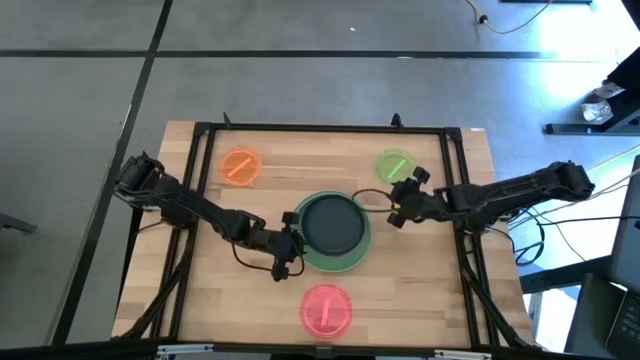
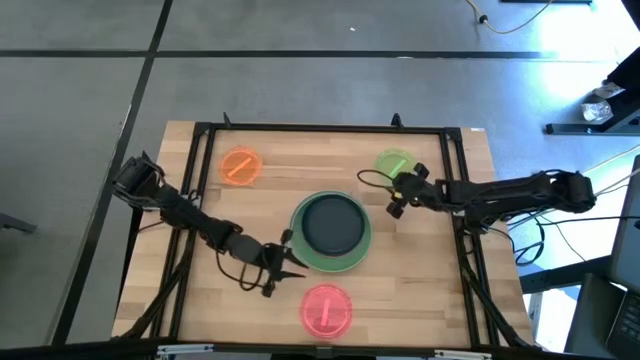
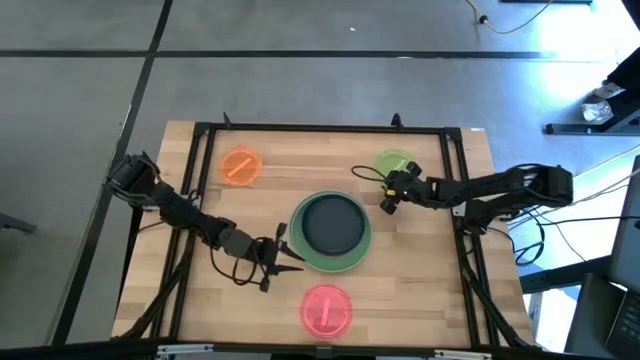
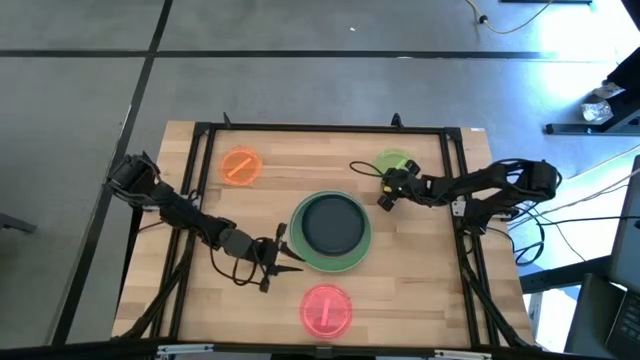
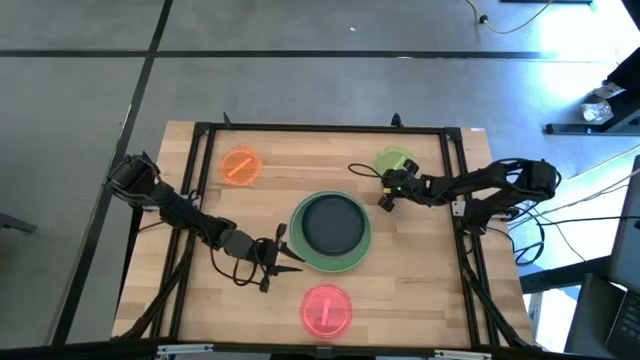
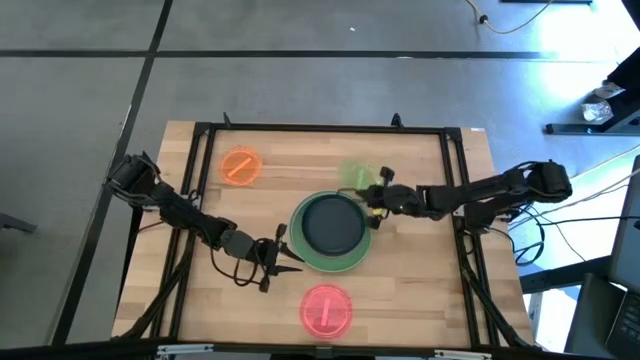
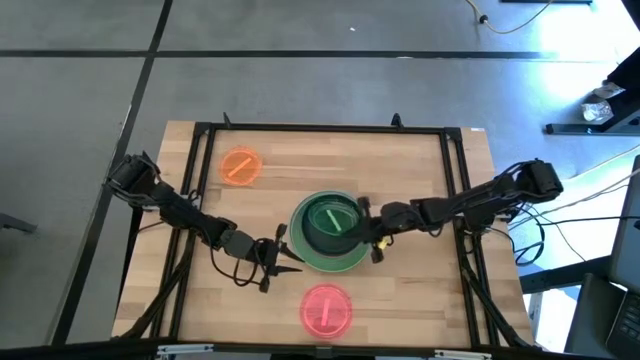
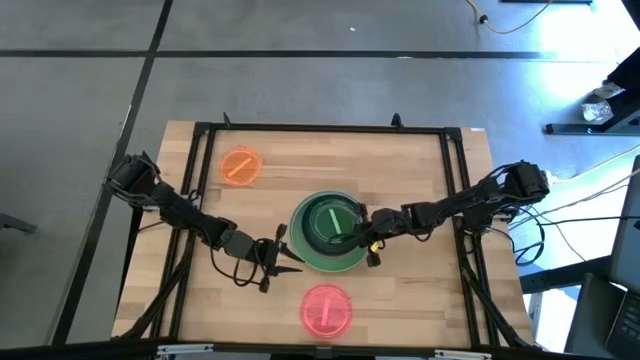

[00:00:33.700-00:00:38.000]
Task: Stack plastic plates
Stack the transparent green plate on top of the dark blue plate

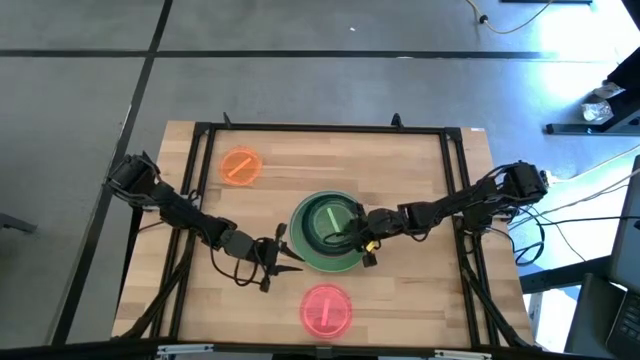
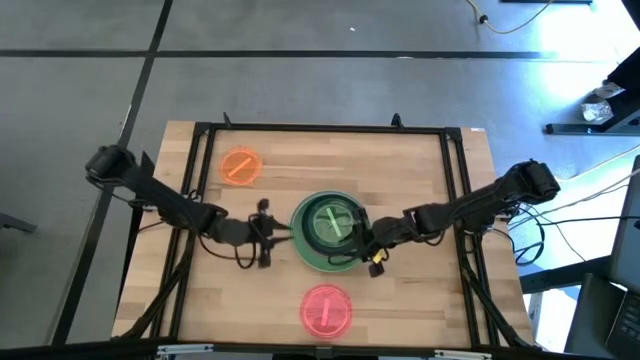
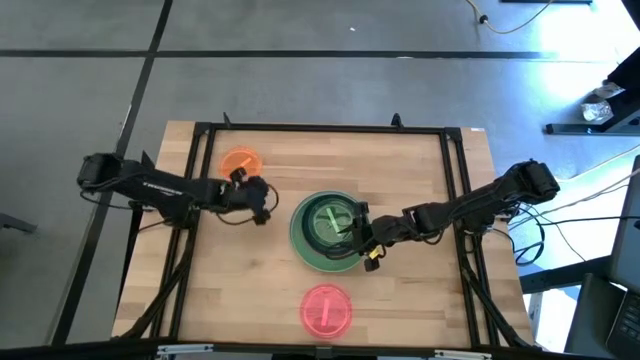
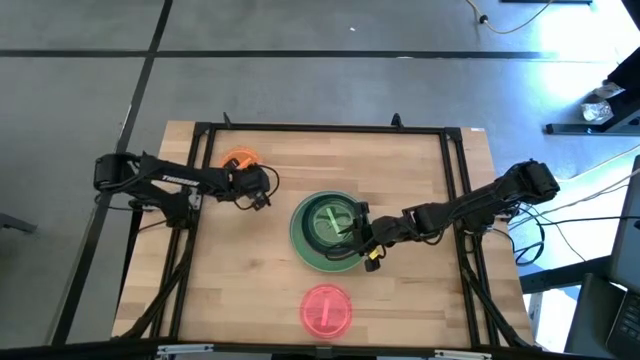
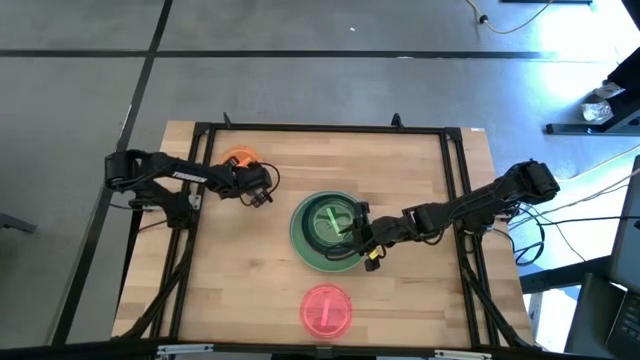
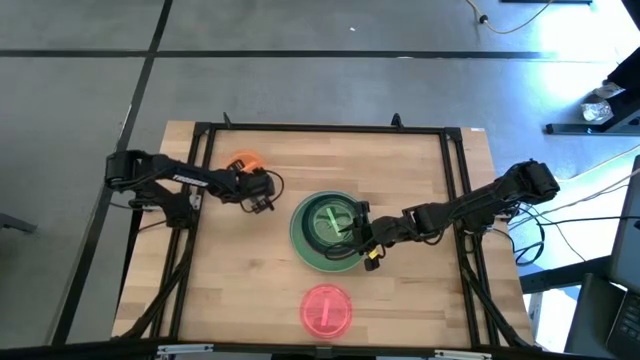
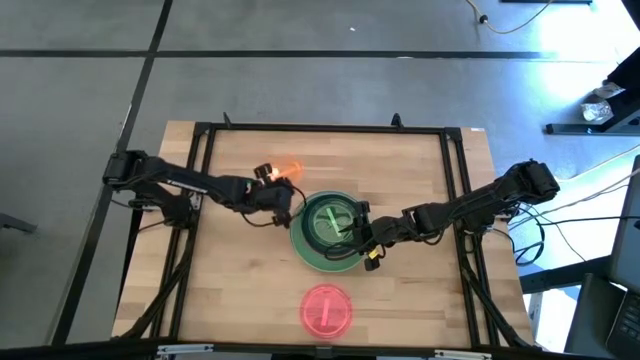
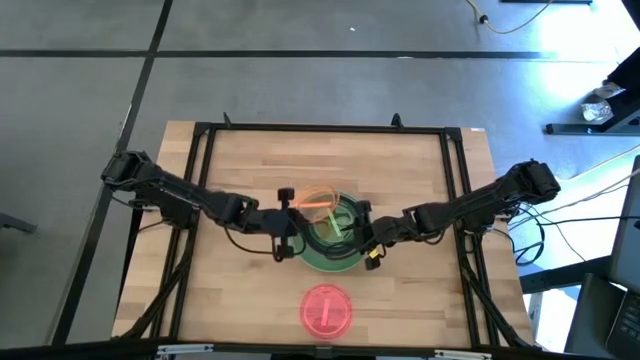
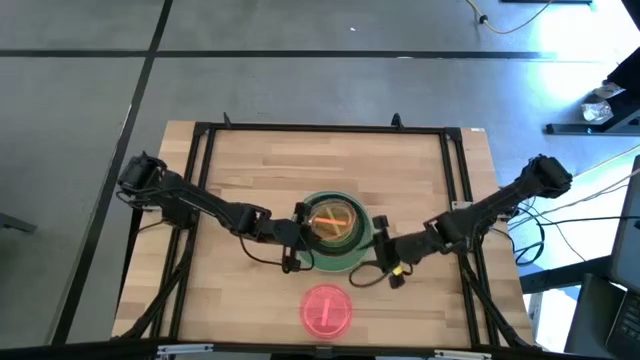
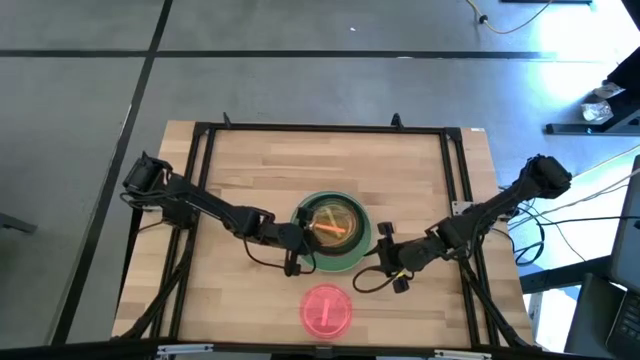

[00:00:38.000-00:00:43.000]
Stack the orange plate on top of the transparent green plate

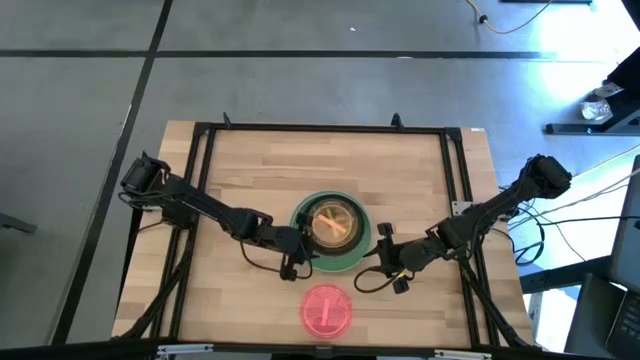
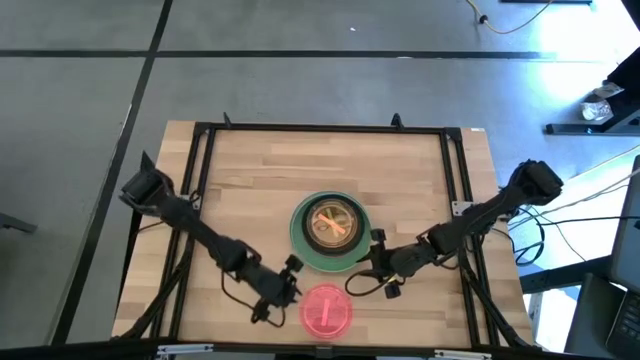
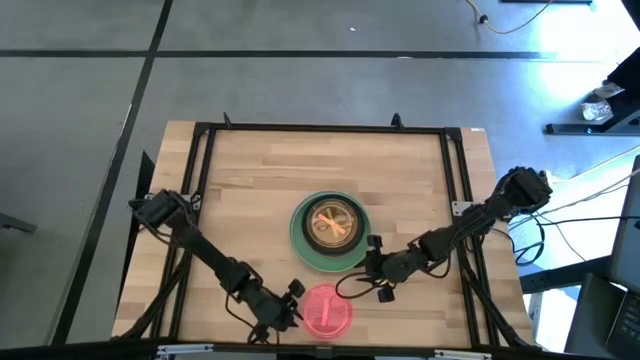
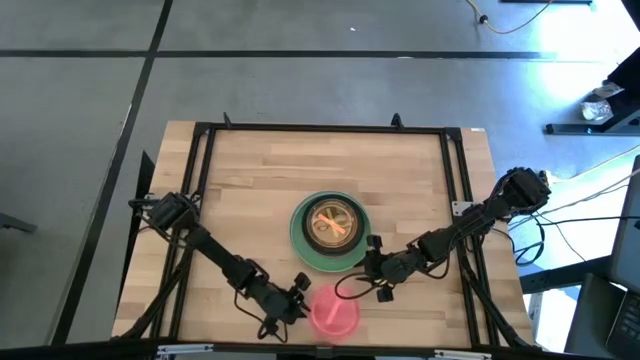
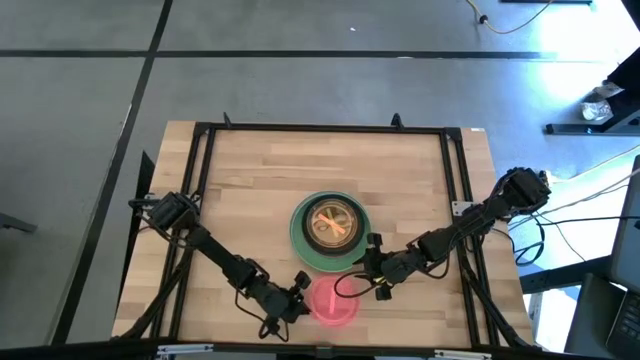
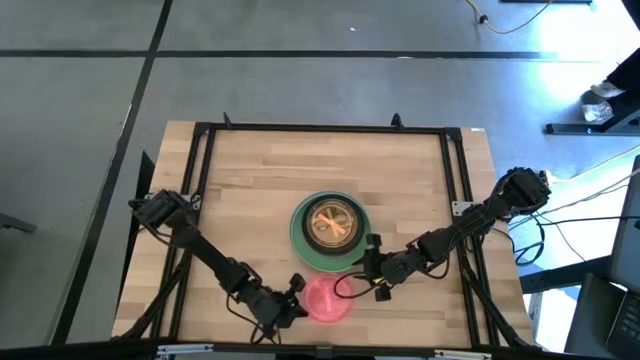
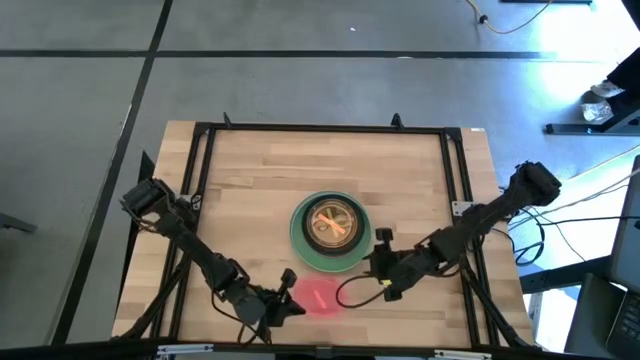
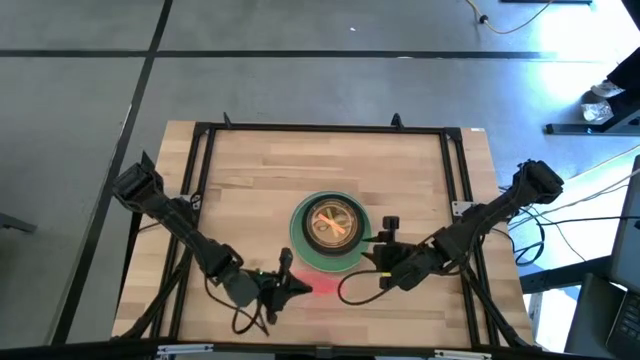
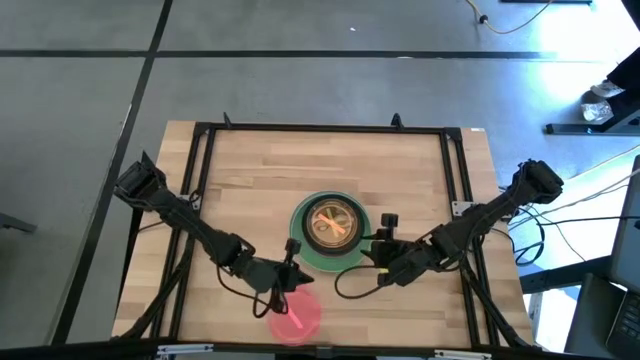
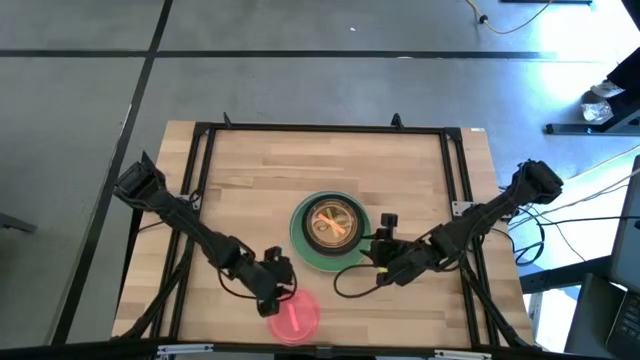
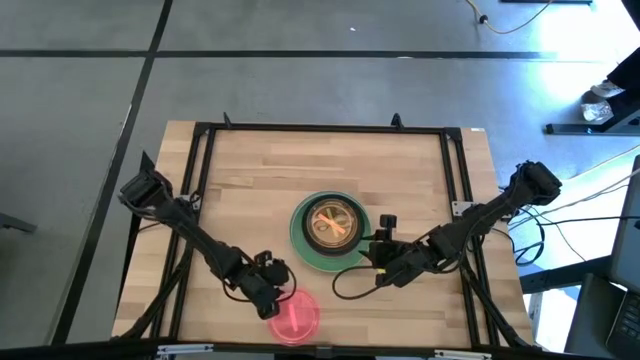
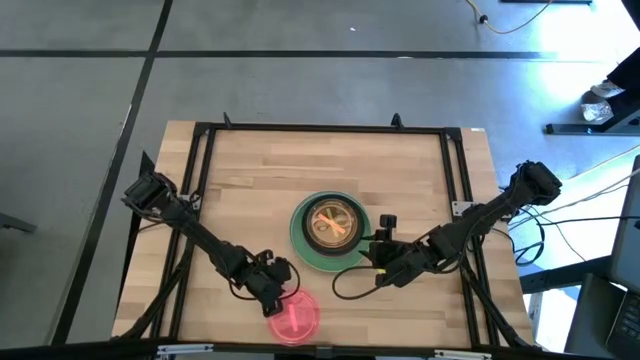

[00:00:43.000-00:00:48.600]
Stack the light pink plate on top of the orange plate

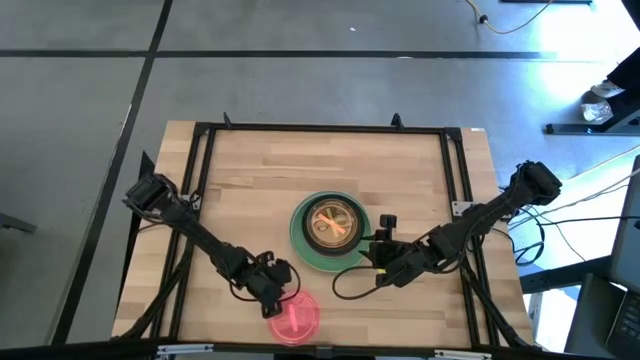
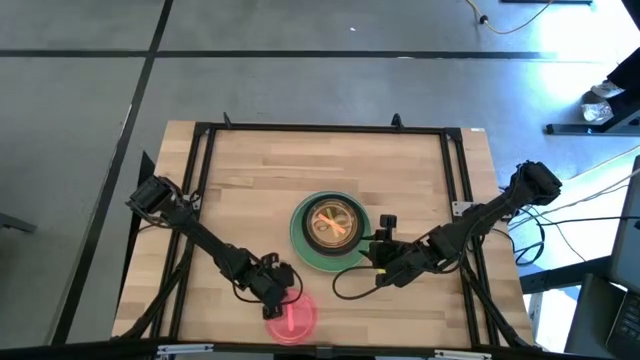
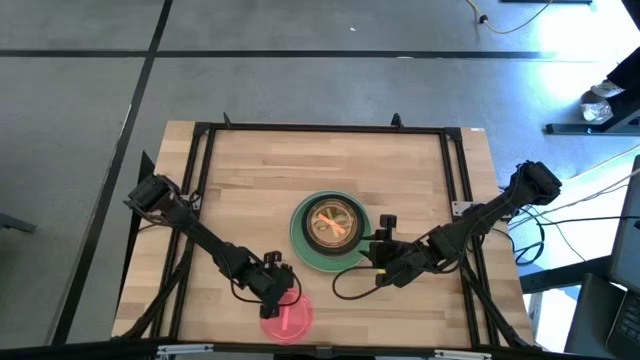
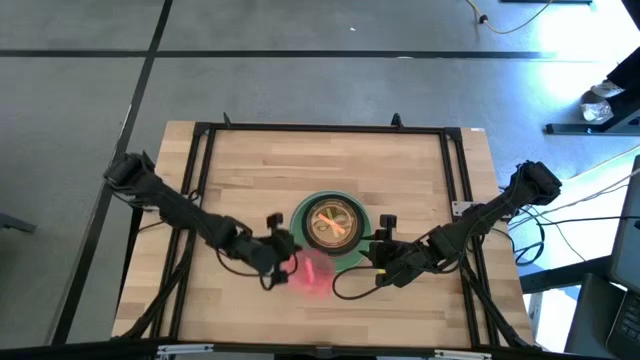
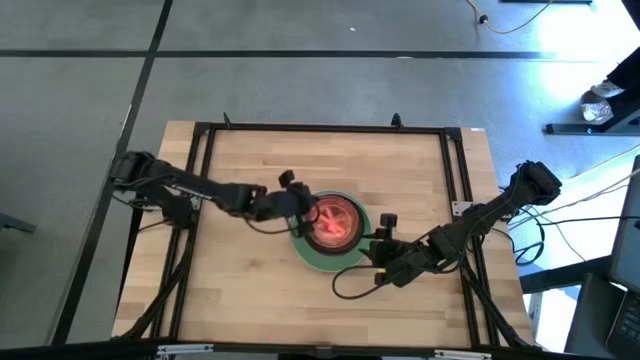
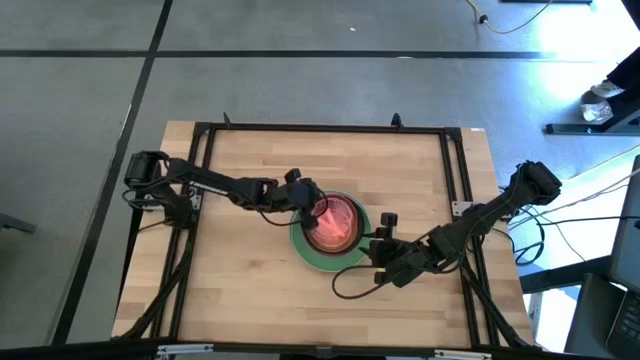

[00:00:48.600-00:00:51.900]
Stack the light pink plate on top of the orange plate

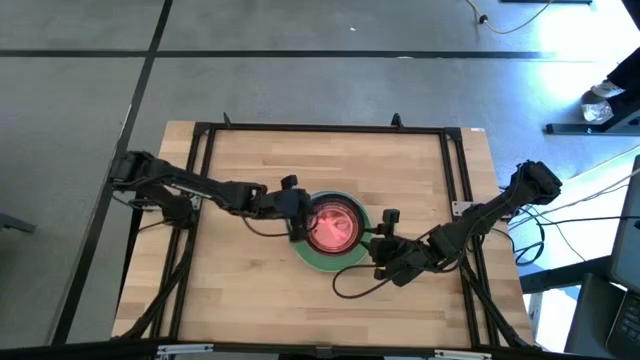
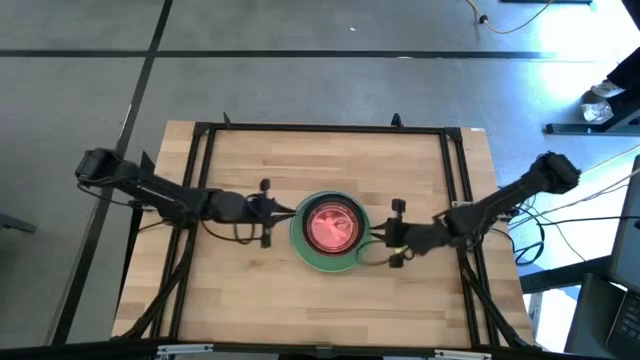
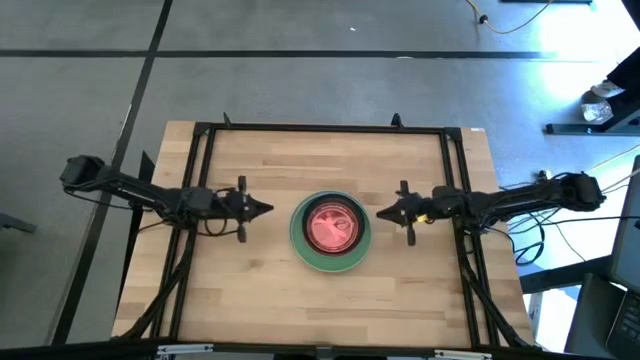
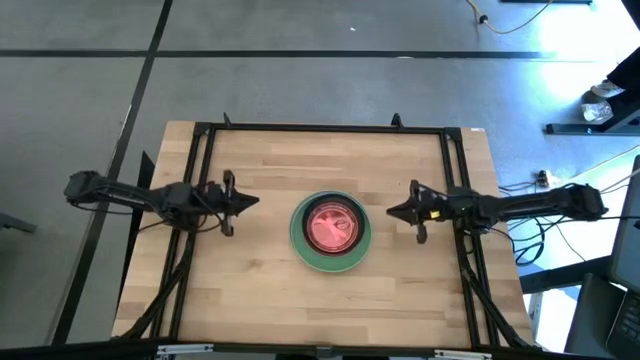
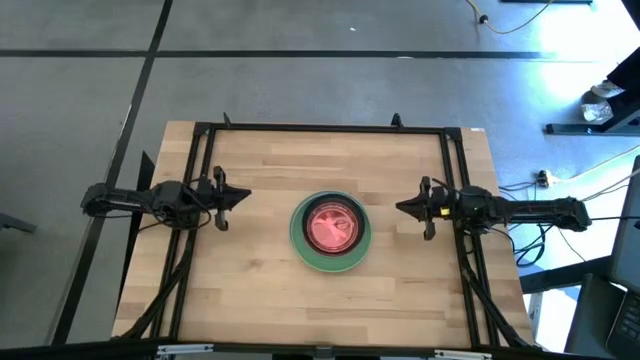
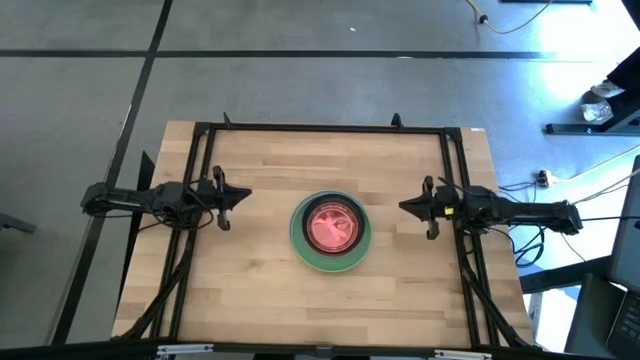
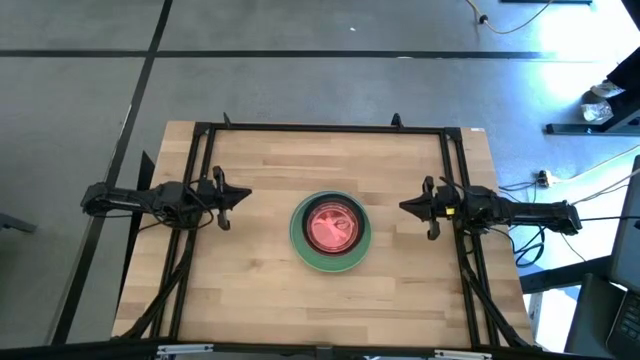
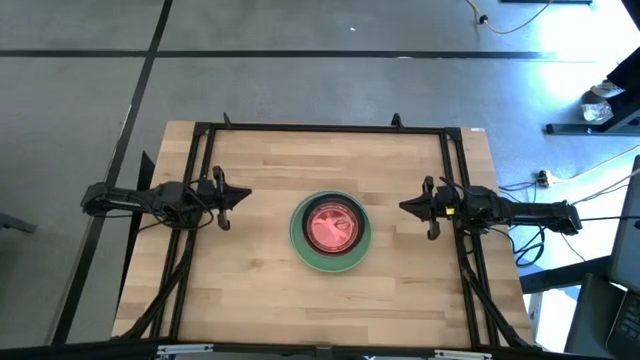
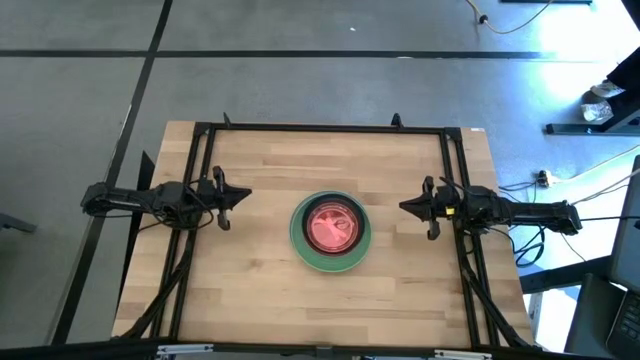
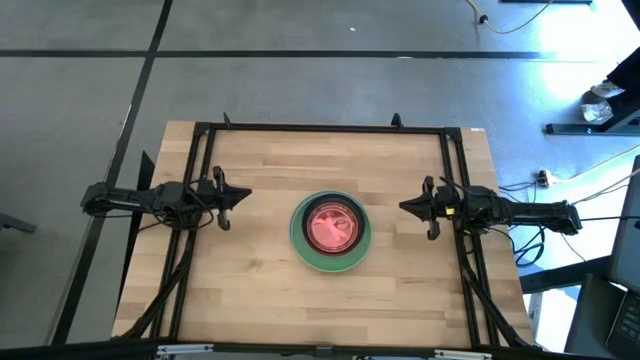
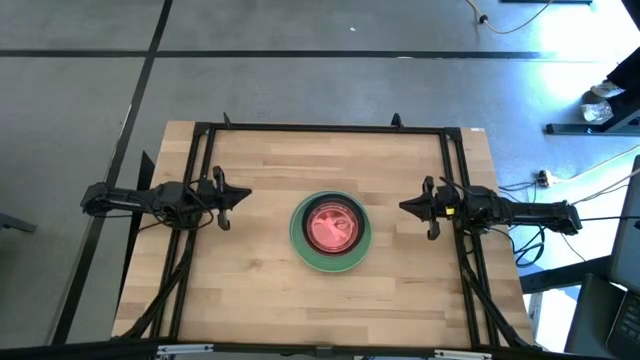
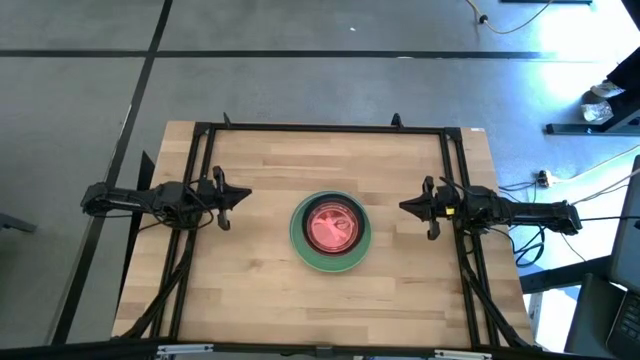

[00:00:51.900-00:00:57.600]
Return To Home Position
